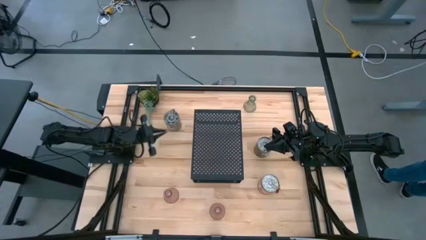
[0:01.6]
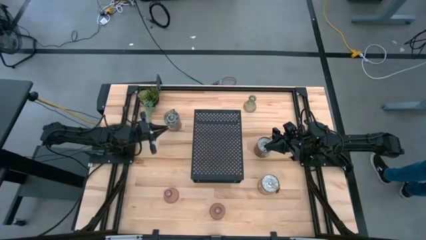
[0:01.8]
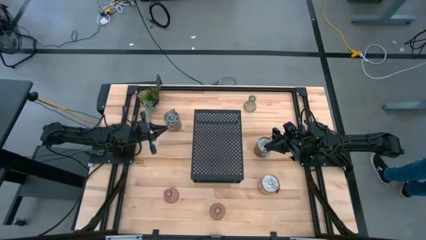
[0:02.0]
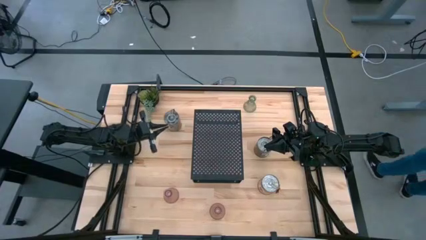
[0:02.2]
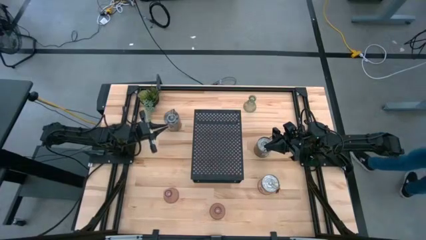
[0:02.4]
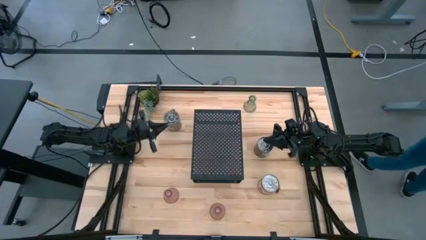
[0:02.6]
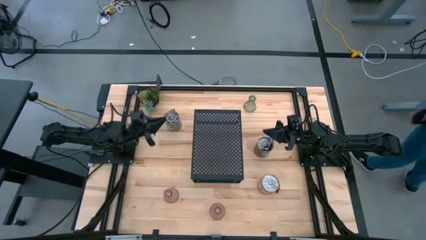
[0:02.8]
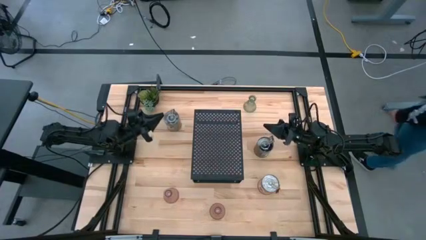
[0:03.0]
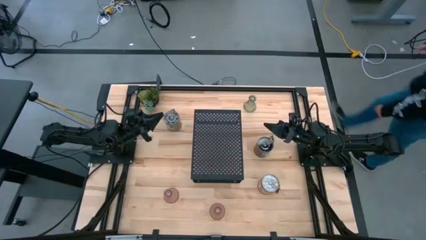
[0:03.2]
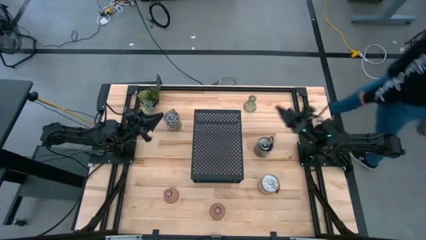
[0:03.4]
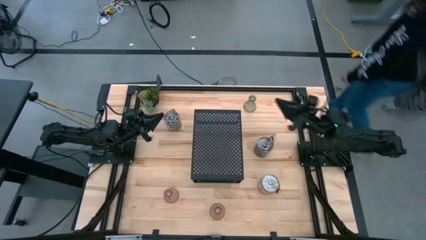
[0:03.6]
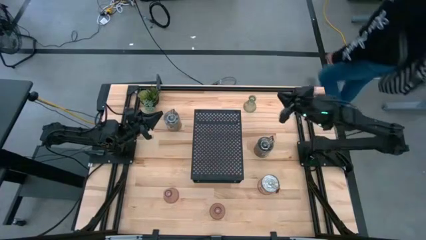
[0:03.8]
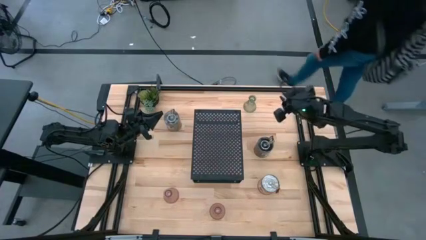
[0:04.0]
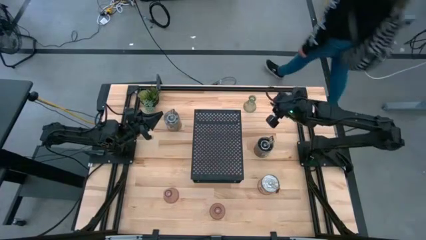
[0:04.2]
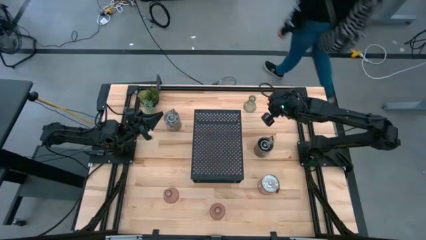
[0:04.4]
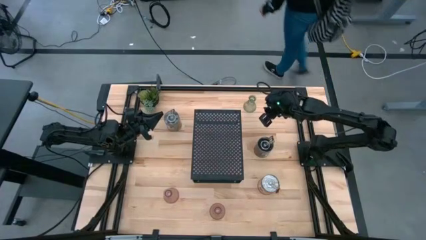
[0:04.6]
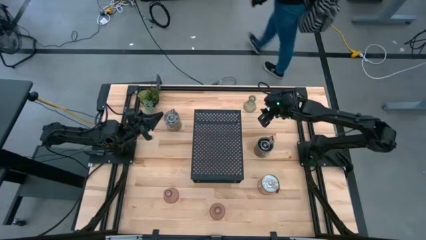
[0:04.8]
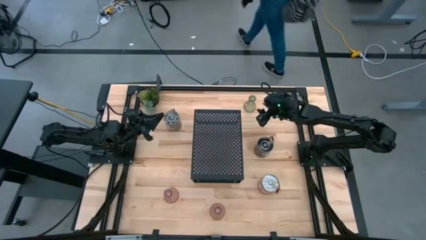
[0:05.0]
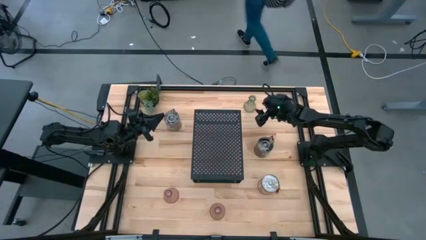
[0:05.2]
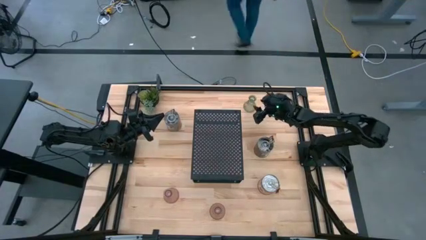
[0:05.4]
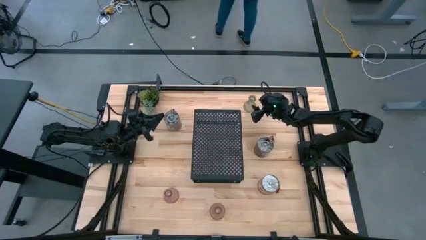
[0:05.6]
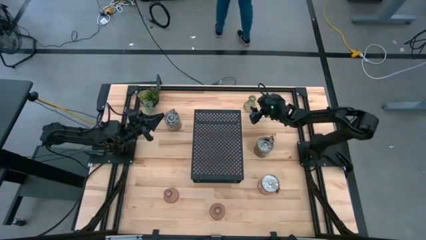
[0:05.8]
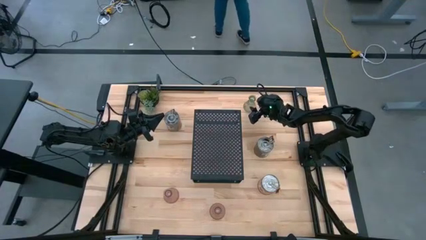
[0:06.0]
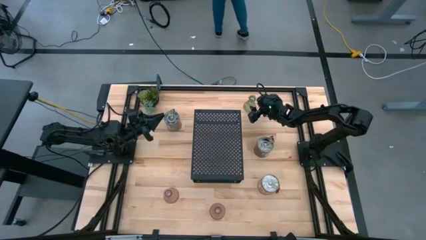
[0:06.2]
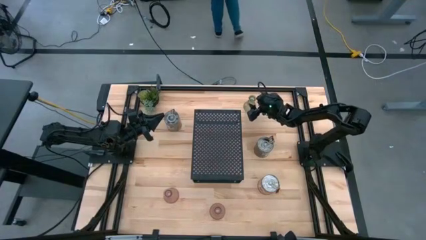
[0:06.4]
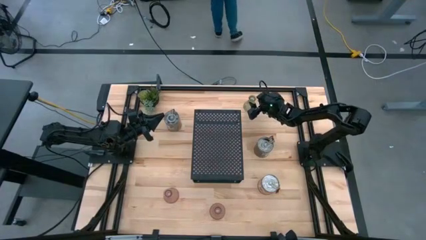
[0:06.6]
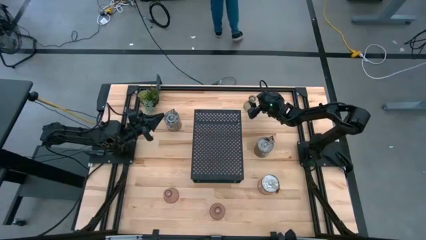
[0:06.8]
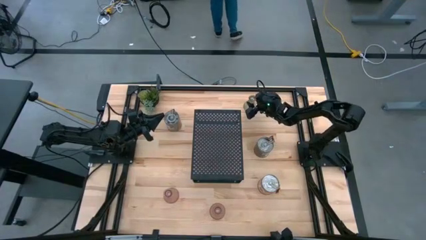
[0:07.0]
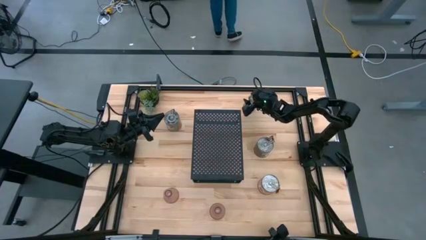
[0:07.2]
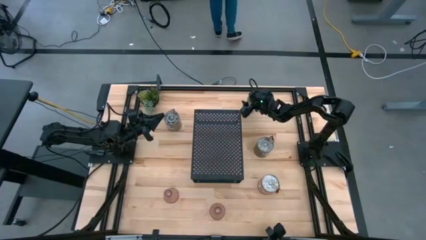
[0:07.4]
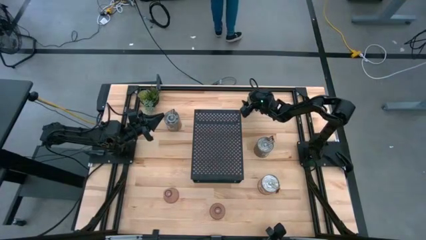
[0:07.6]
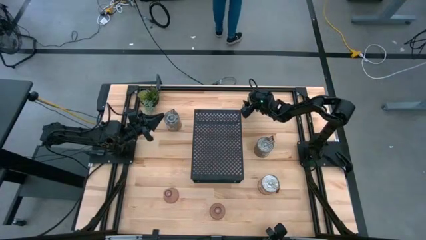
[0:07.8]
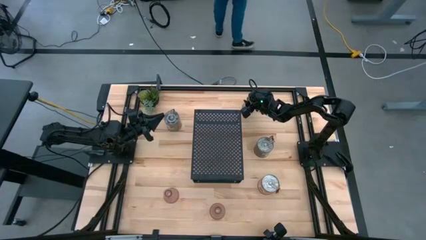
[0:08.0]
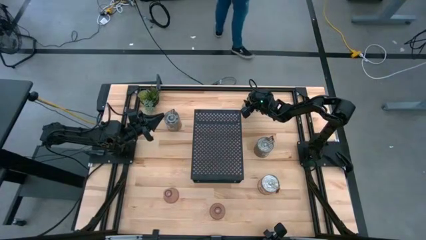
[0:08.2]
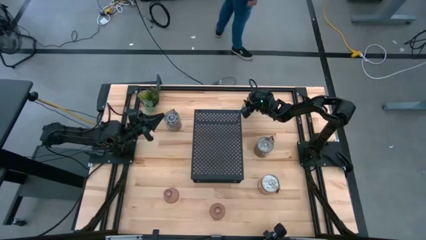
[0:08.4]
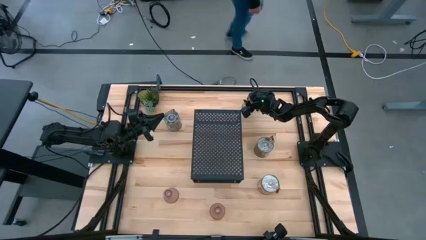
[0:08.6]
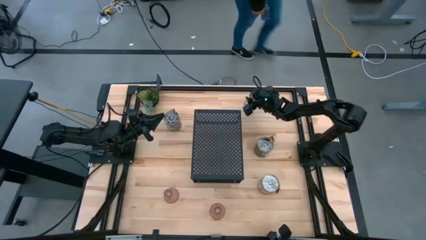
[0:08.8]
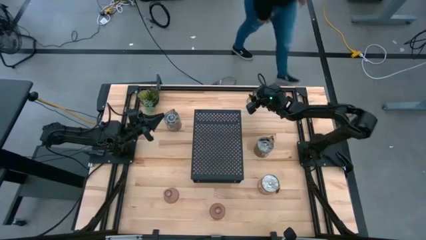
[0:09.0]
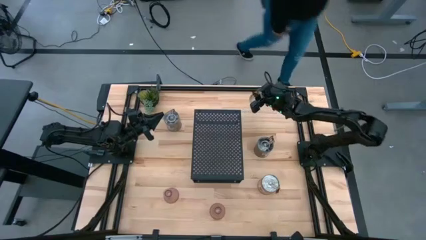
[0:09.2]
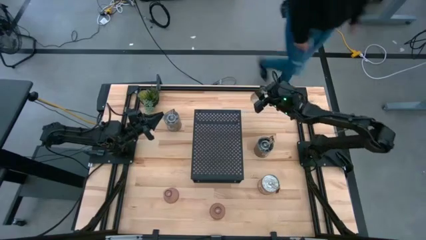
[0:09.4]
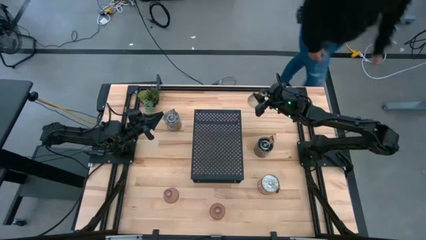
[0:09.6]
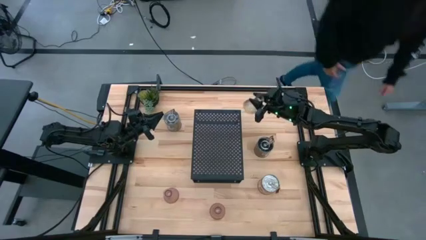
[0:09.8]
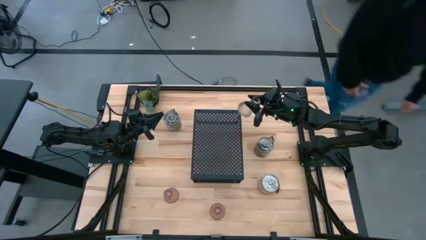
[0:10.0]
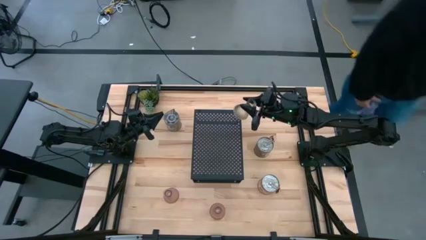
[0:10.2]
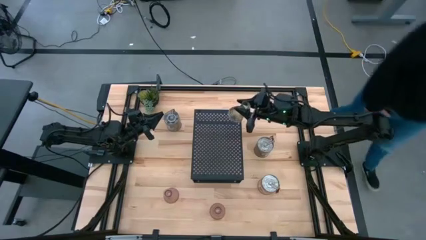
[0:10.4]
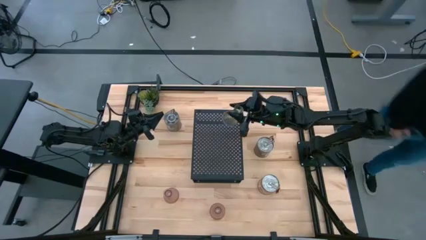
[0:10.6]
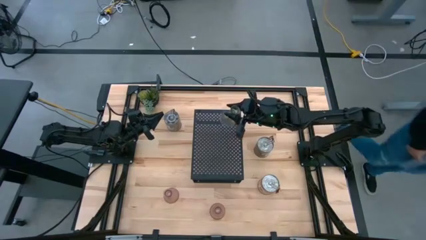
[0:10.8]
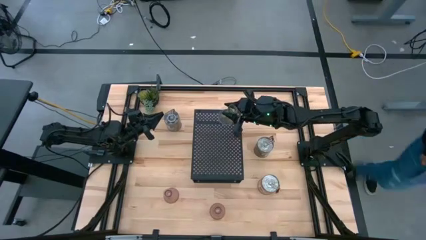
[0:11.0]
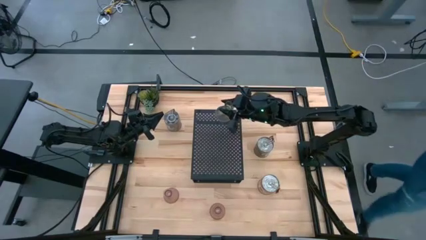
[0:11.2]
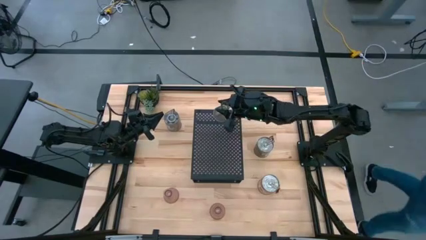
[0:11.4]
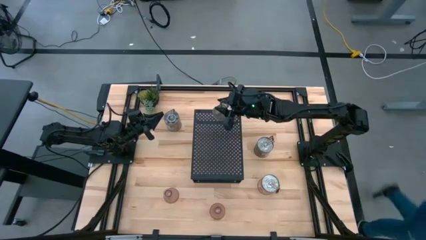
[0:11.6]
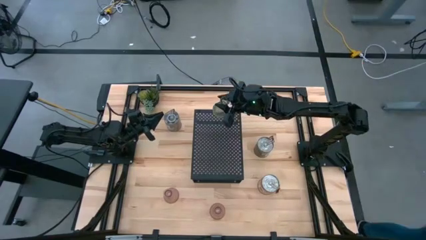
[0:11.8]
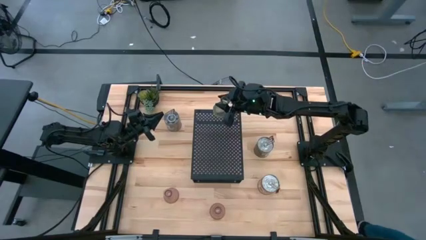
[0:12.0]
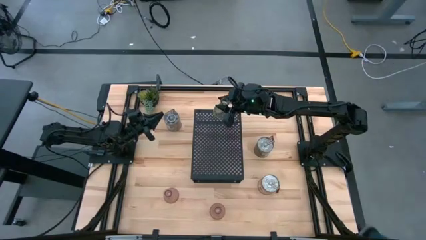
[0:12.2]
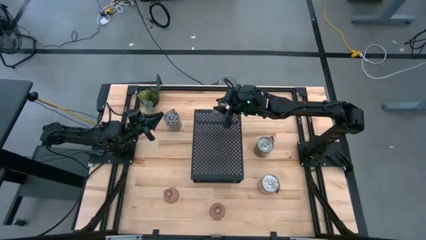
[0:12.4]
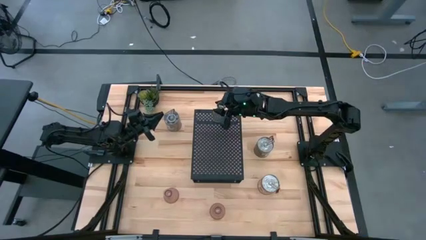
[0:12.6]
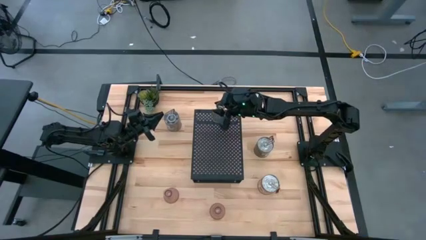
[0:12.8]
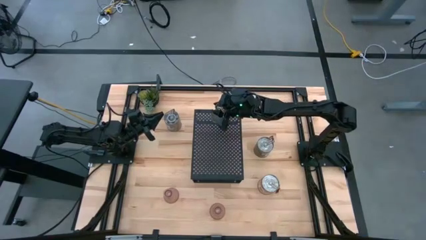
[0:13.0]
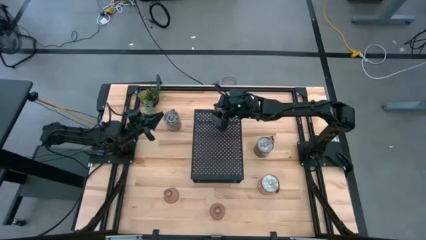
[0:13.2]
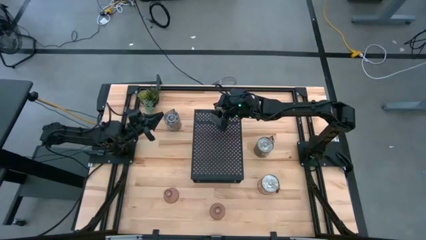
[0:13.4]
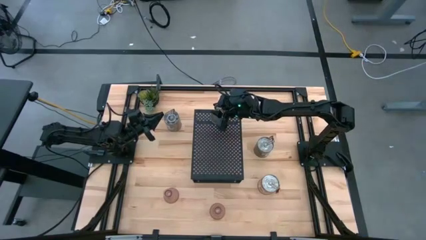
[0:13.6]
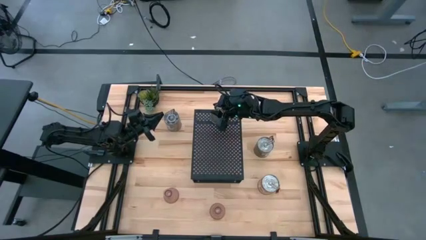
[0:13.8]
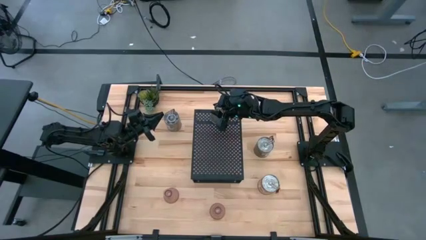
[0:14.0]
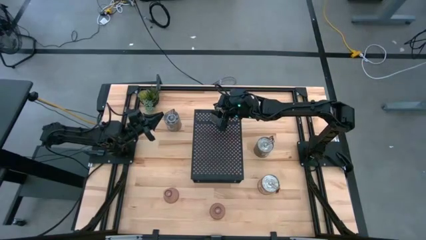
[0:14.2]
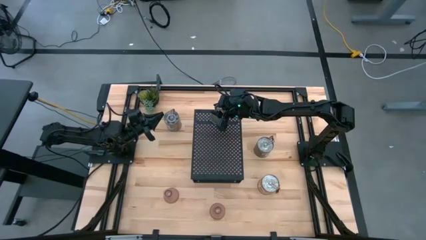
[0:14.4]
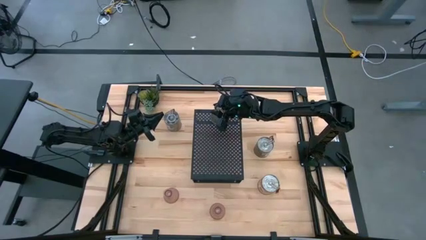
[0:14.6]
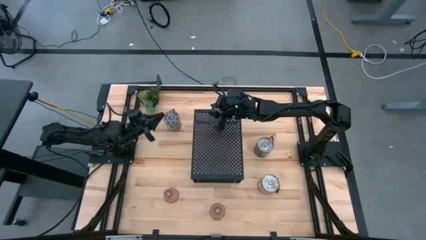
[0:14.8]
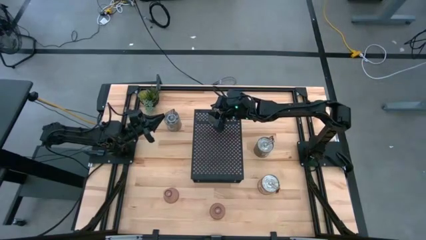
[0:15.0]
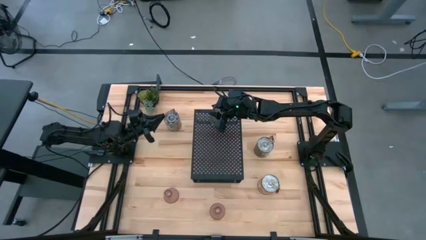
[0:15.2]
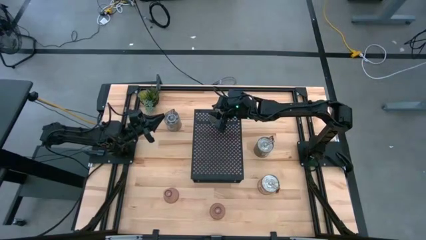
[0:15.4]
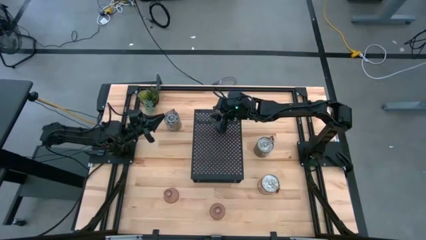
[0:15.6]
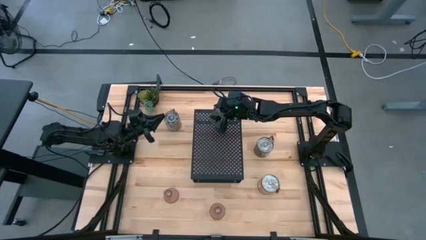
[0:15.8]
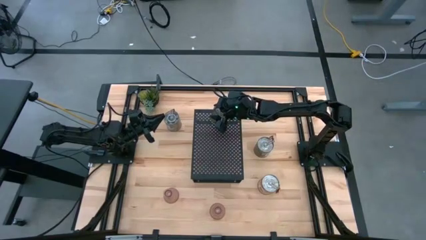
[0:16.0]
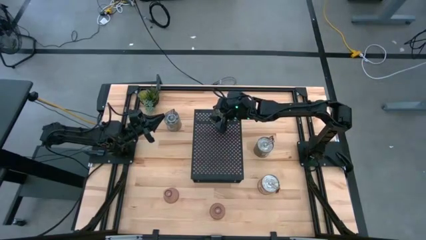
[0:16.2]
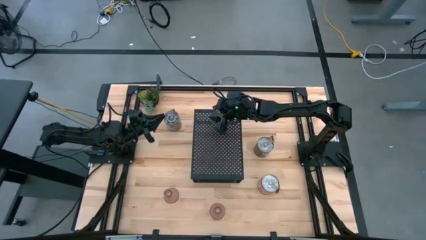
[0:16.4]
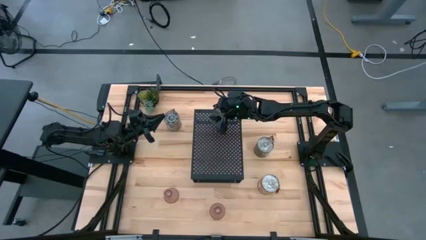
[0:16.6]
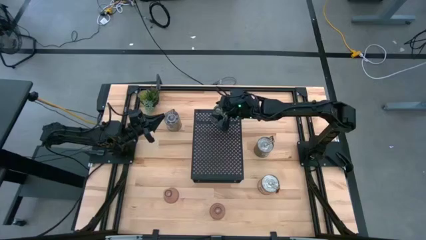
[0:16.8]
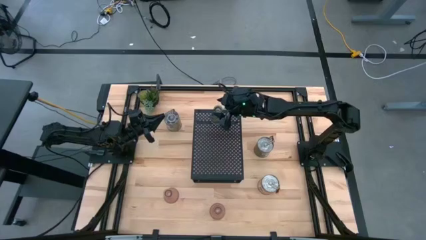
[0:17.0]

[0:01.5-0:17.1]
Task: Pick & Place candle stick holders
Put the green glass candle holder on the shelf
